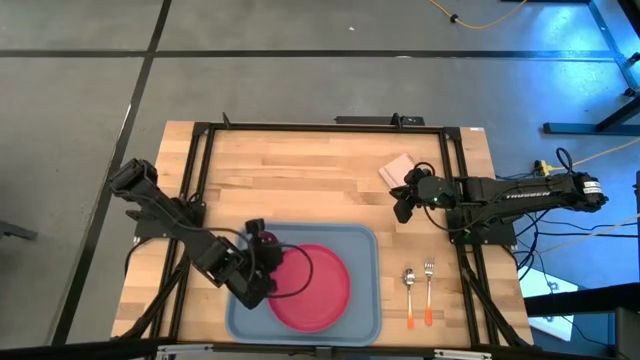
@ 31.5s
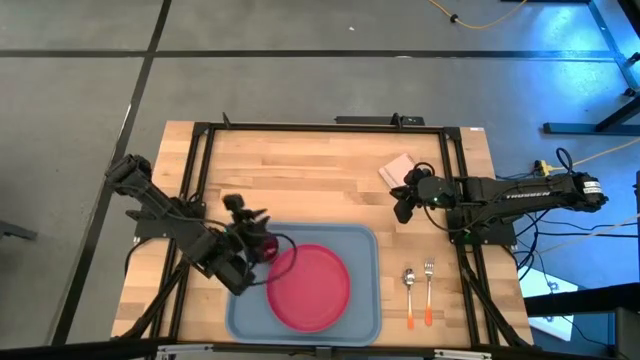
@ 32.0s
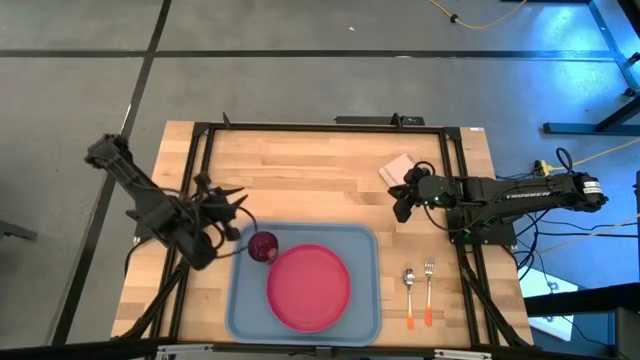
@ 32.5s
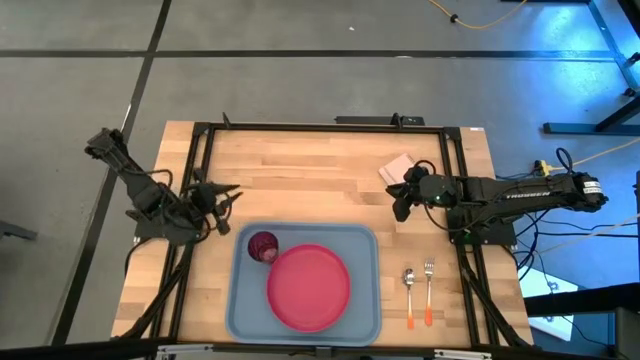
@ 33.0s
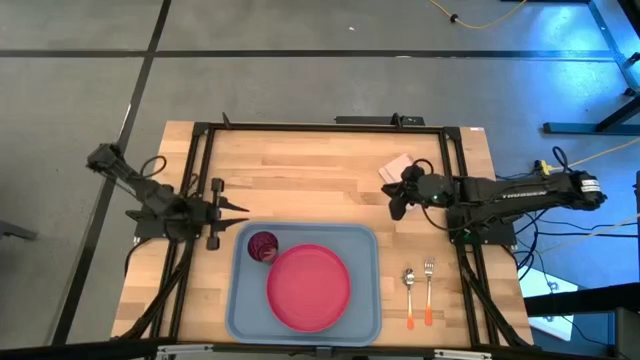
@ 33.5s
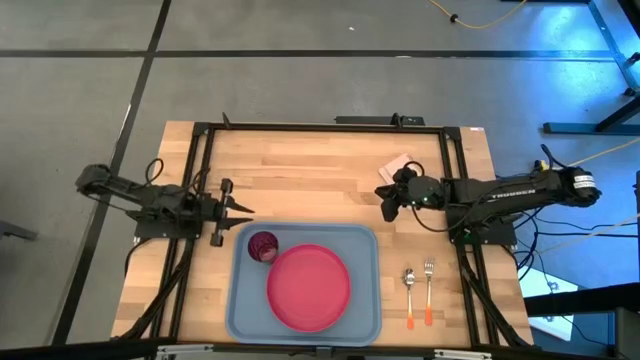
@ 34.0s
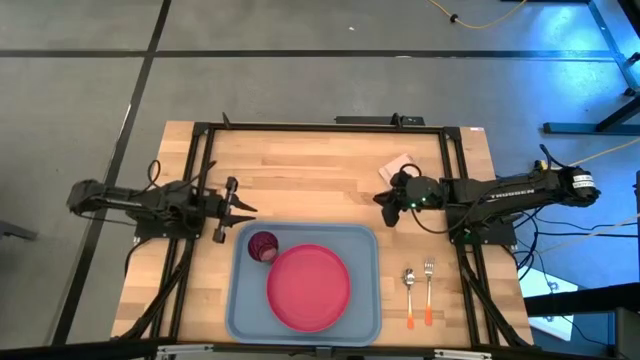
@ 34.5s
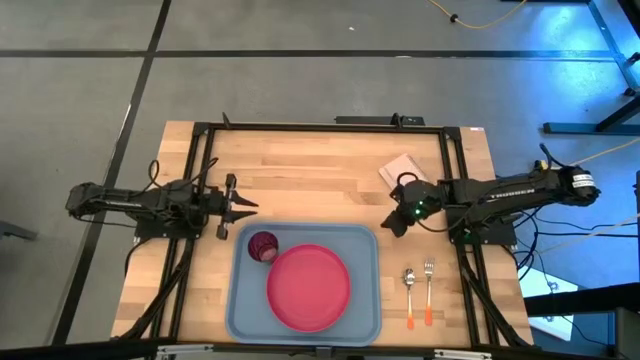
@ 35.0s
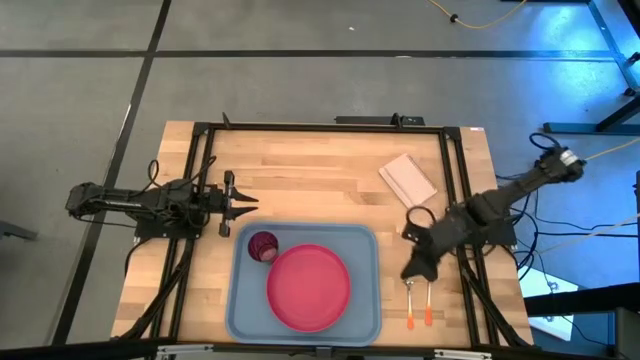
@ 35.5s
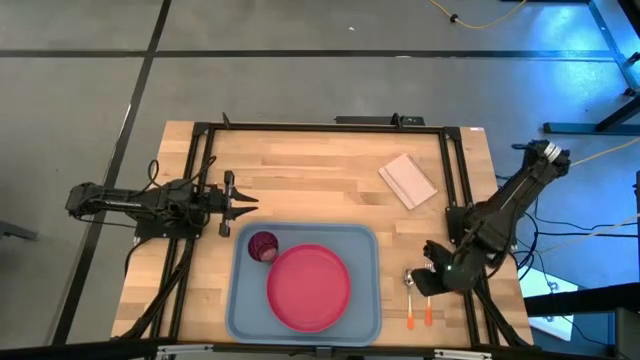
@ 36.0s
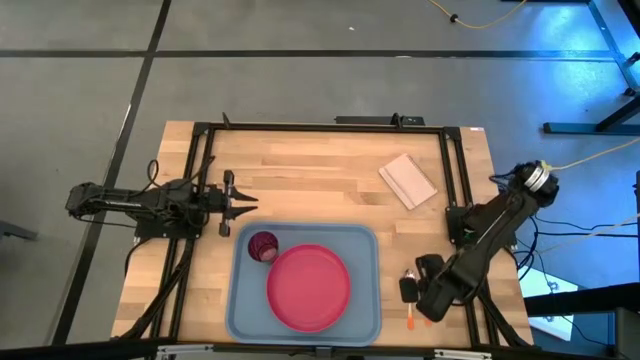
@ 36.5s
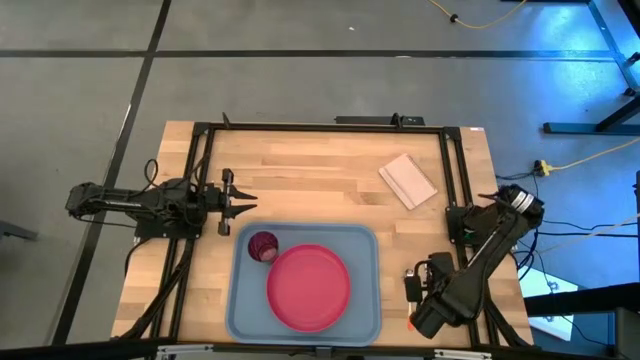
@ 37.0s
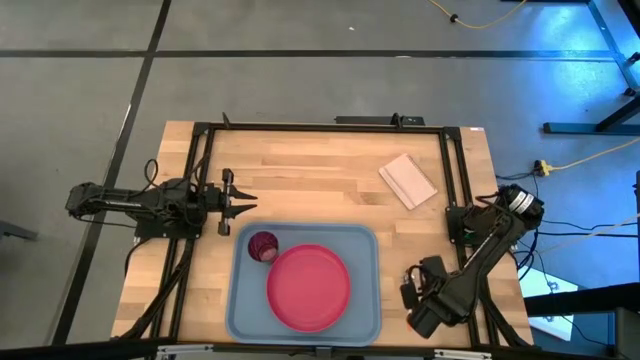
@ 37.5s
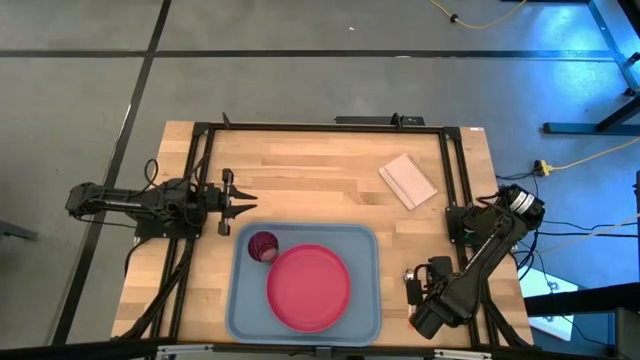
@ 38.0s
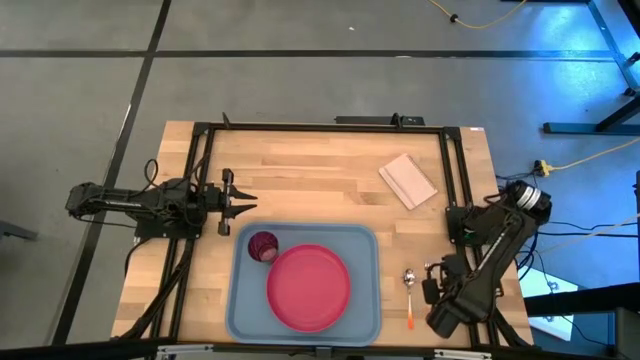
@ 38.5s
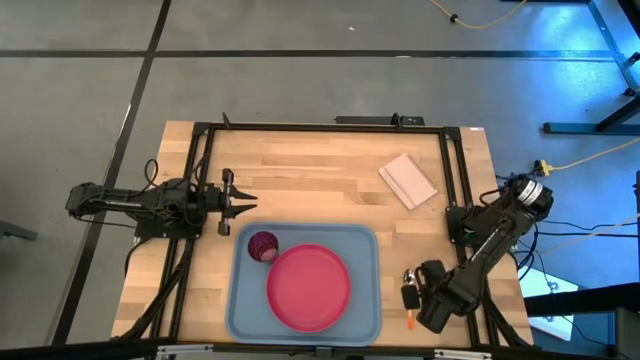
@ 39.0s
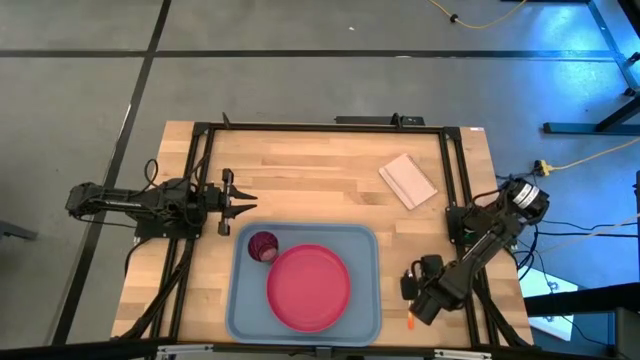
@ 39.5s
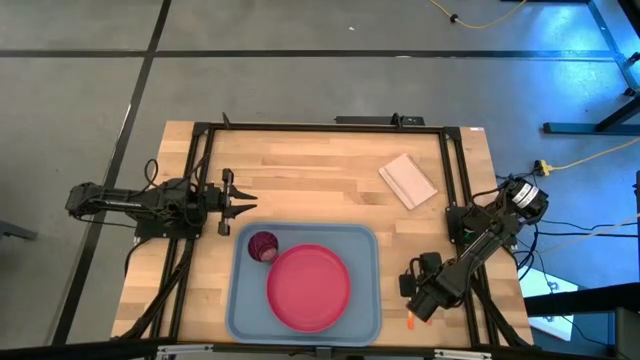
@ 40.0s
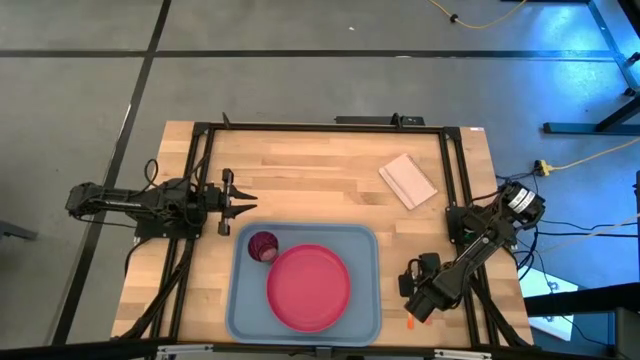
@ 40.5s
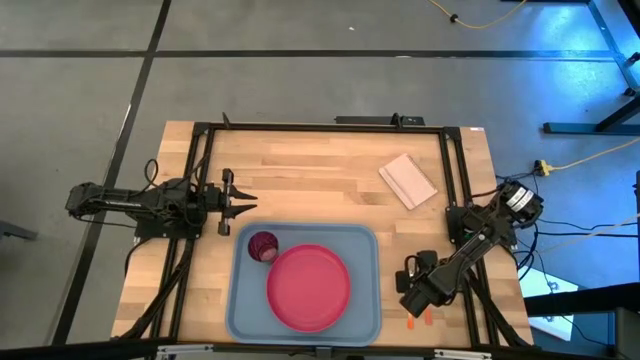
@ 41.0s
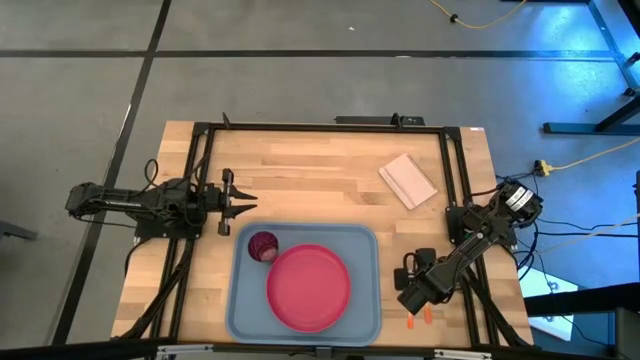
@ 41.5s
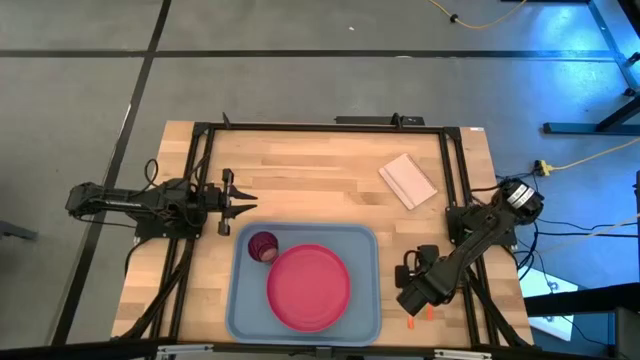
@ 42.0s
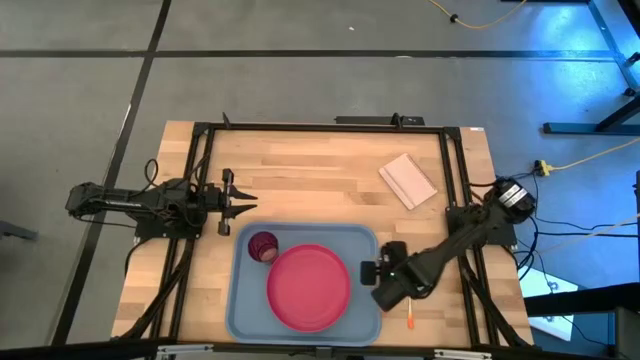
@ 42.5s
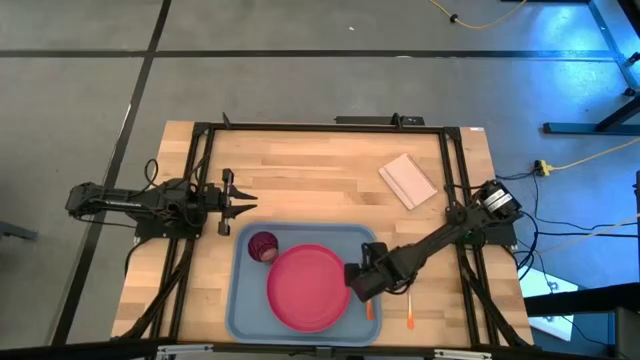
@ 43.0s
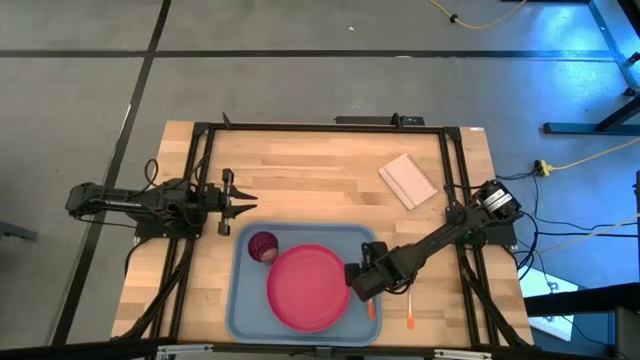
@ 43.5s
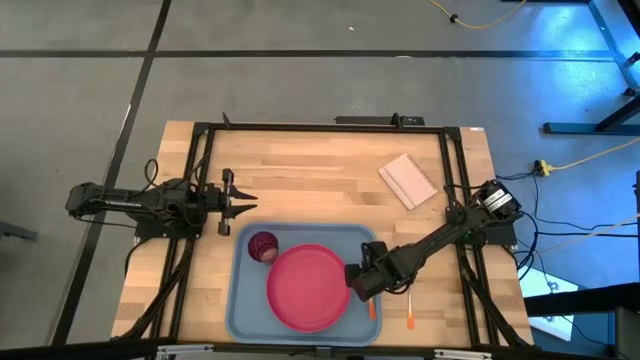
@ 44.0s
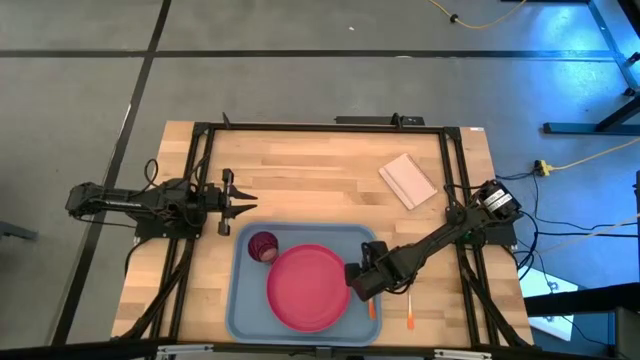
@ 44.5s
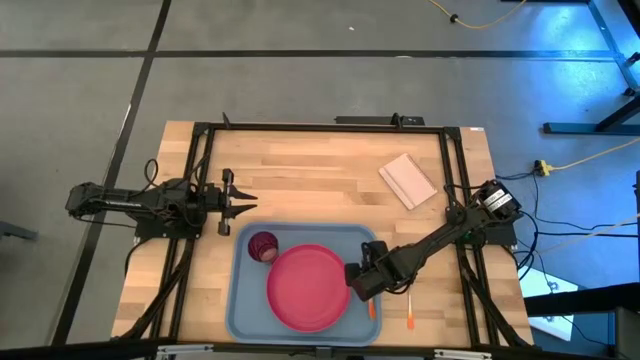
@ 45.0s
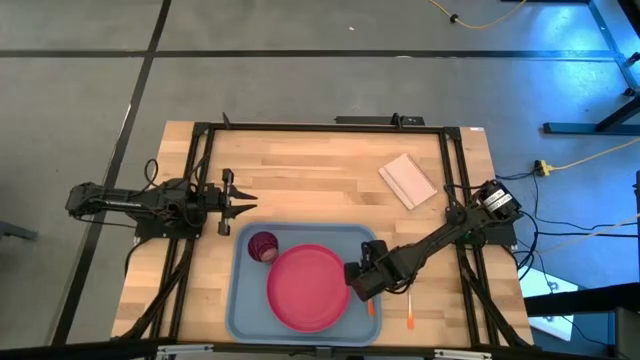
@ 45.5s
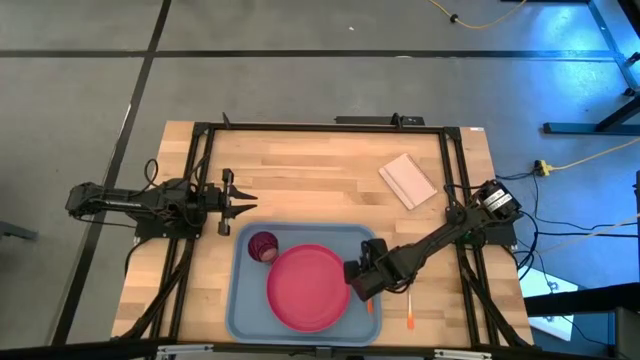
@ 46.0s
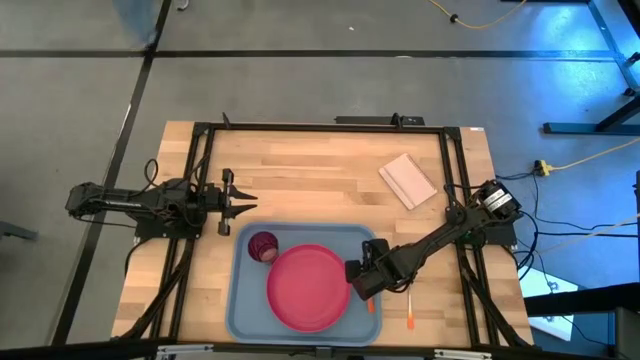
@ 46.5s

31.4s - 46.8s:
Task: Pick and place plate/cup/fork/spoon on tray
Put the orange fork on the right side of the pink plate on the blue tray

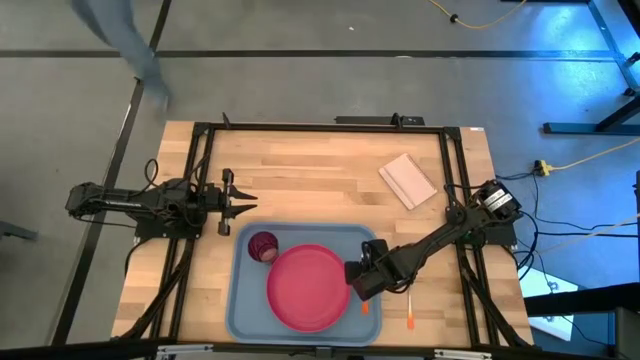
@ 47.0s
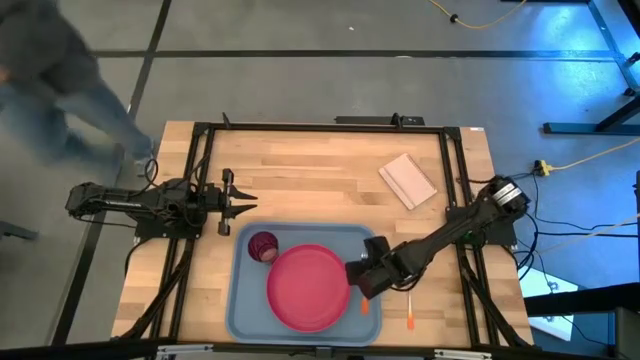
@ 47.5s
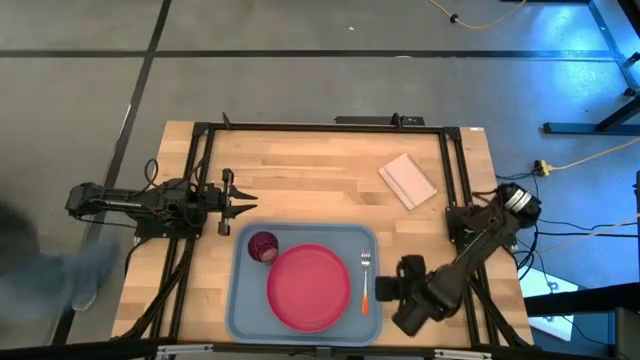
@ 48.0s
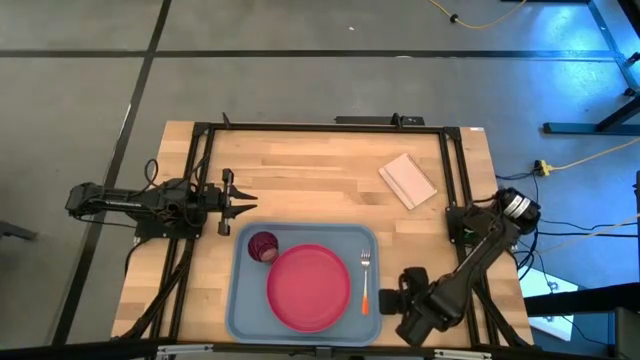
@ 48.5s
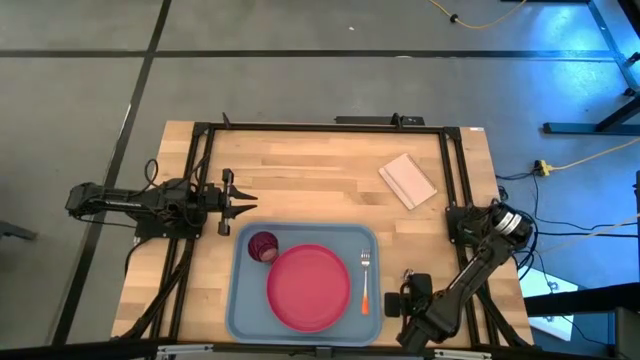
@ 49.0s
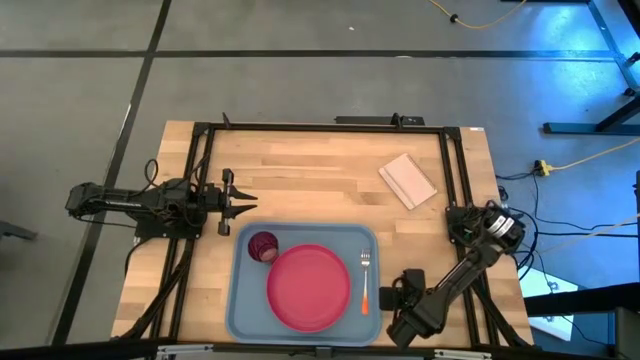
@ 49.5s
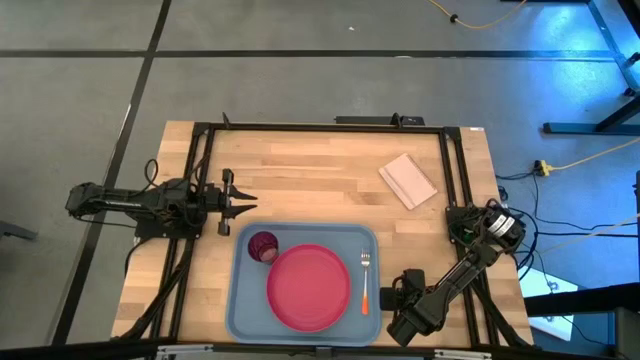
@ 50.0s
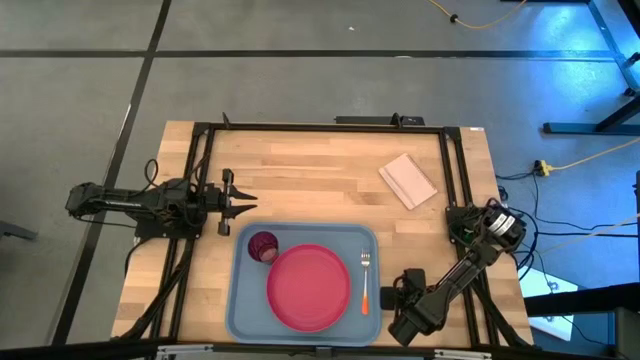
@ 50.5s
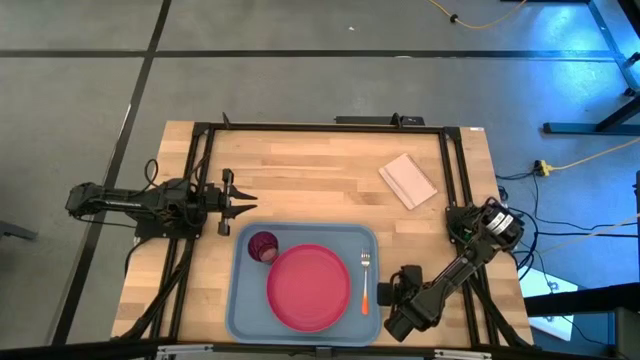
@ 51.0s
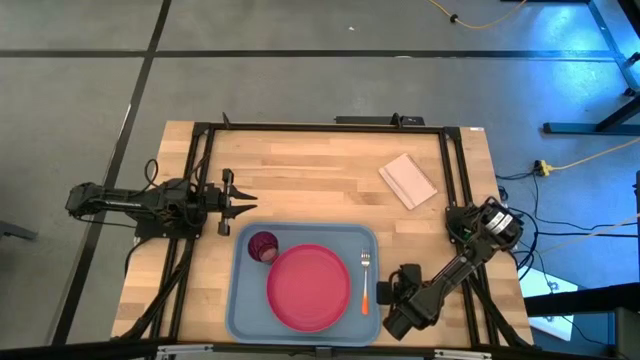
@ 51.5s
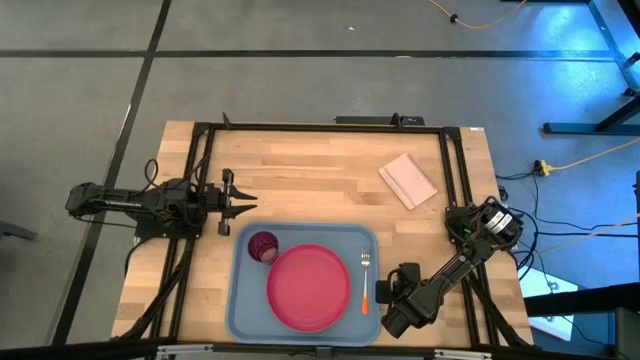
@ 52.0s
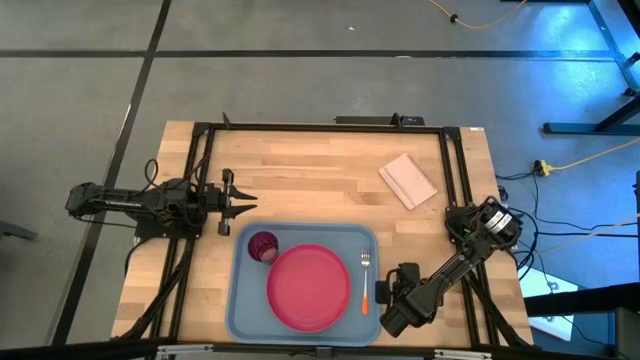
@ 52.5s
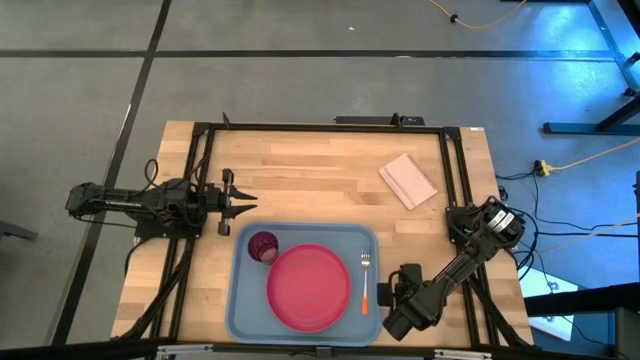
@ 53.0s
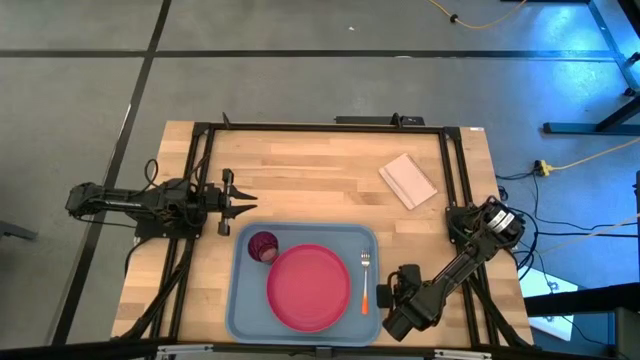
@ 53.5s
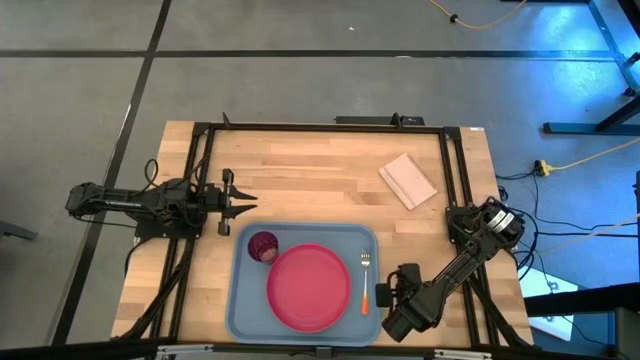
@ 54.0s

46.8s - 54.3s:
Put the orange spoon beside the pink plate on the blue tray
